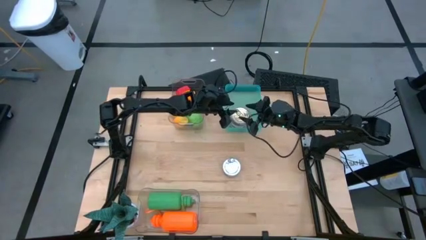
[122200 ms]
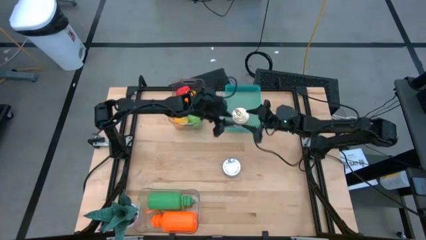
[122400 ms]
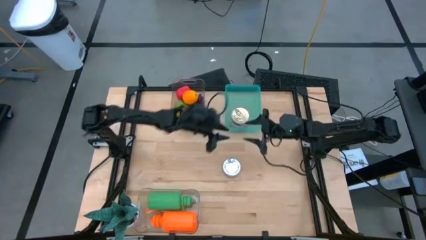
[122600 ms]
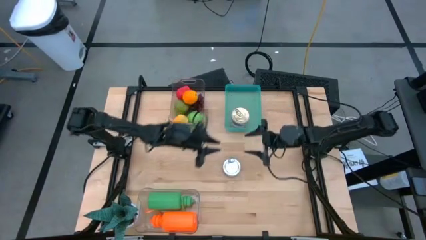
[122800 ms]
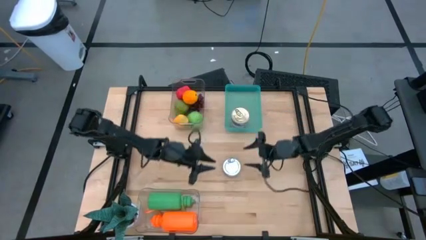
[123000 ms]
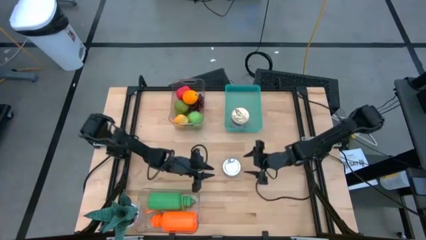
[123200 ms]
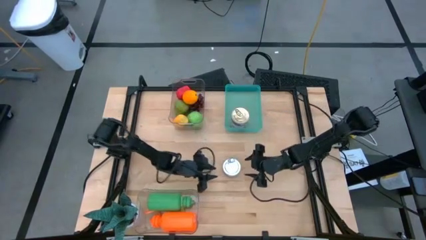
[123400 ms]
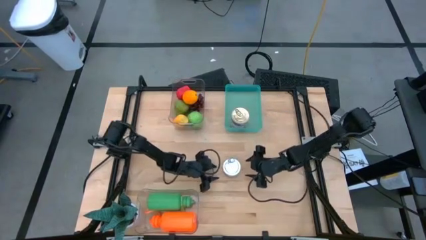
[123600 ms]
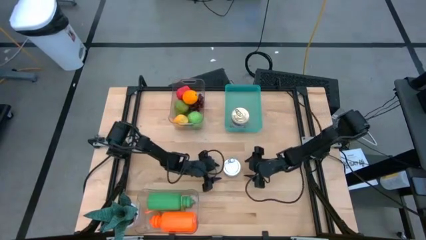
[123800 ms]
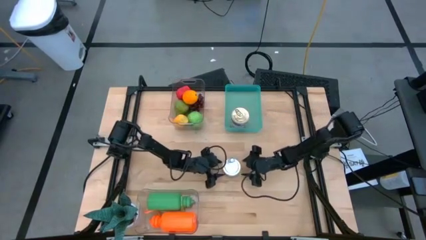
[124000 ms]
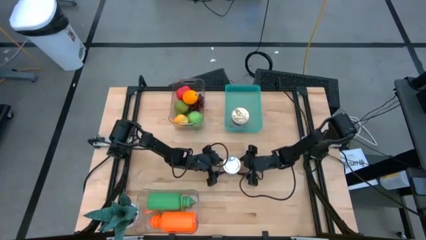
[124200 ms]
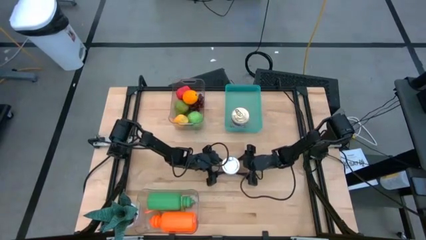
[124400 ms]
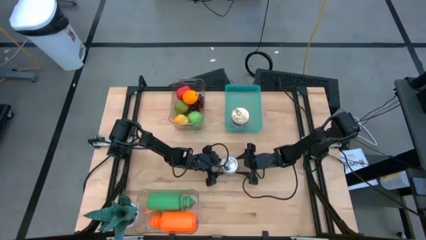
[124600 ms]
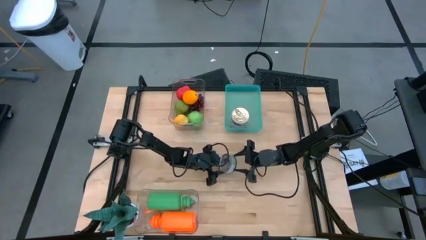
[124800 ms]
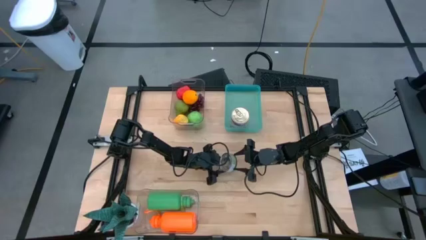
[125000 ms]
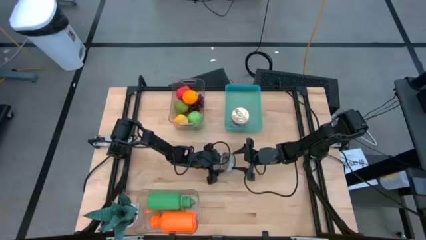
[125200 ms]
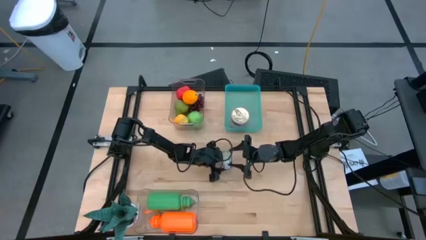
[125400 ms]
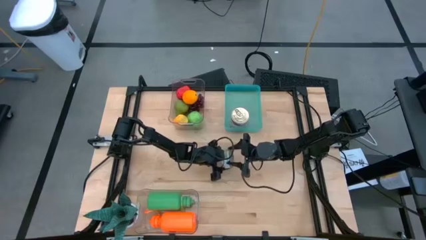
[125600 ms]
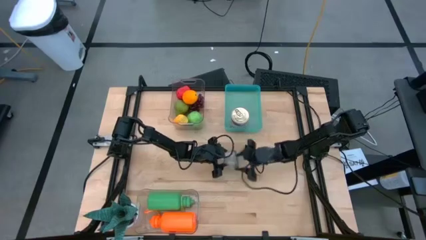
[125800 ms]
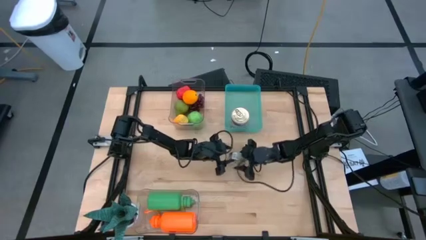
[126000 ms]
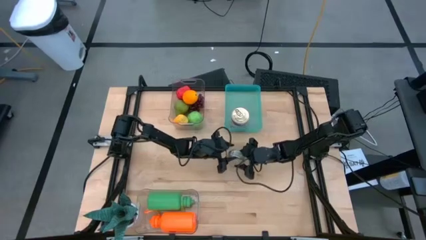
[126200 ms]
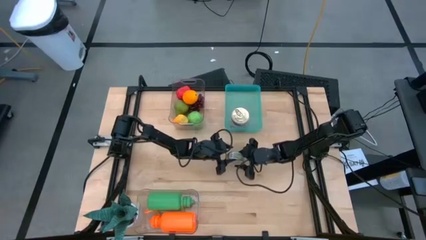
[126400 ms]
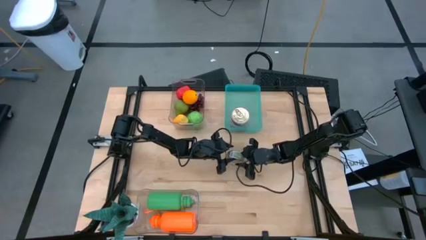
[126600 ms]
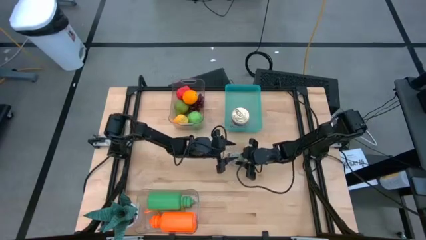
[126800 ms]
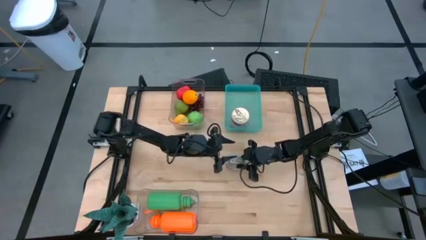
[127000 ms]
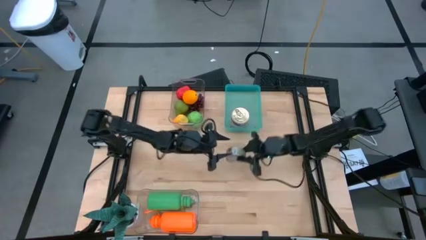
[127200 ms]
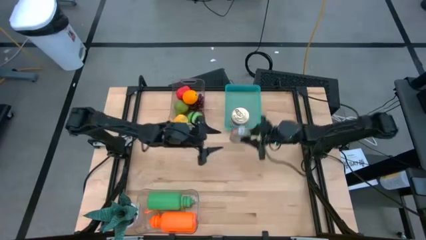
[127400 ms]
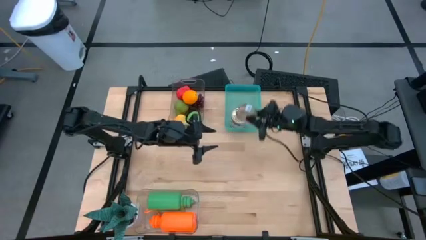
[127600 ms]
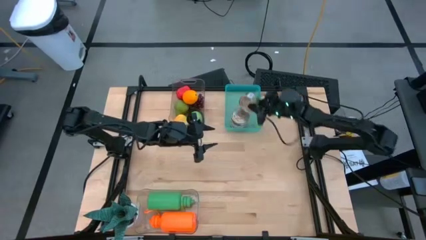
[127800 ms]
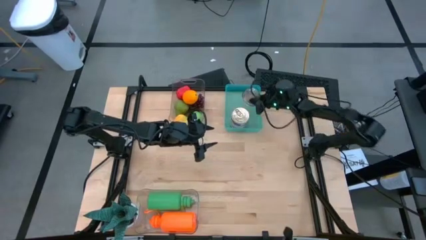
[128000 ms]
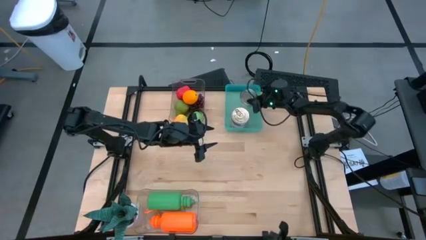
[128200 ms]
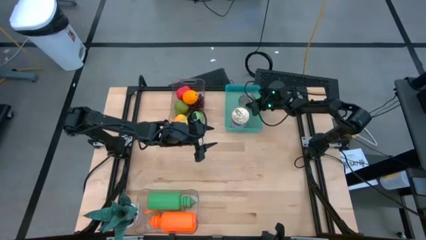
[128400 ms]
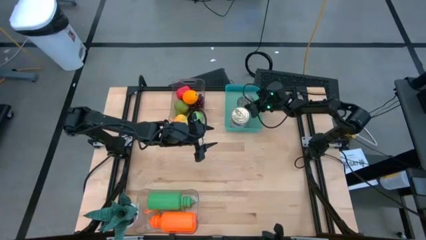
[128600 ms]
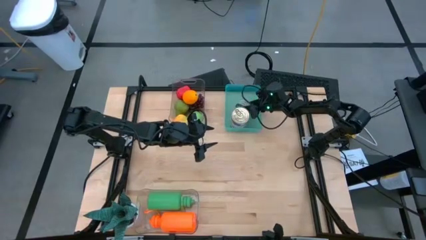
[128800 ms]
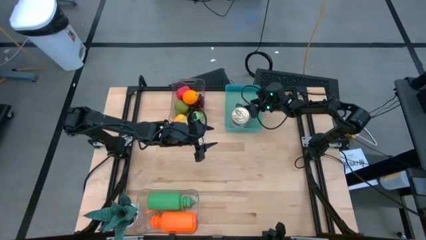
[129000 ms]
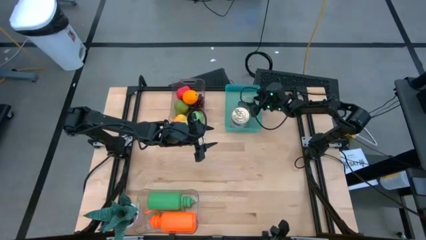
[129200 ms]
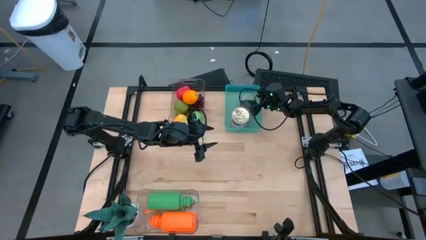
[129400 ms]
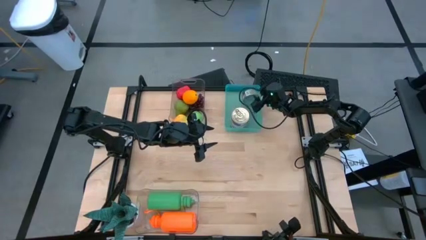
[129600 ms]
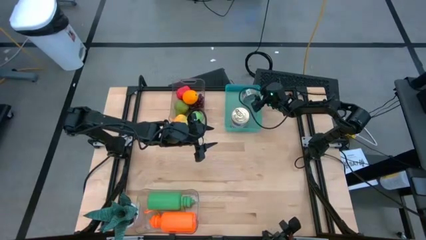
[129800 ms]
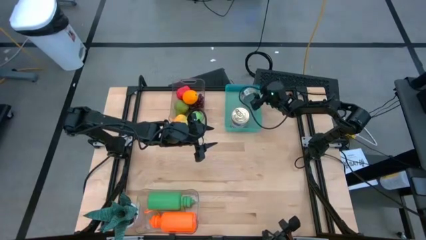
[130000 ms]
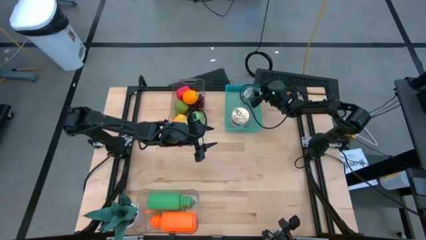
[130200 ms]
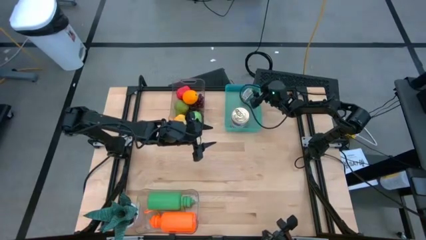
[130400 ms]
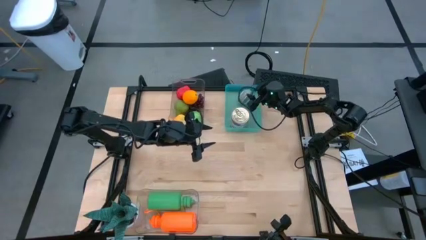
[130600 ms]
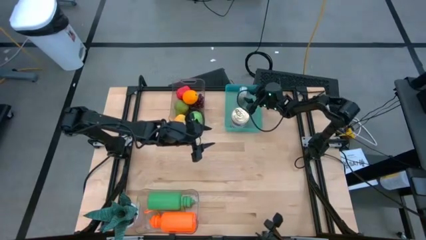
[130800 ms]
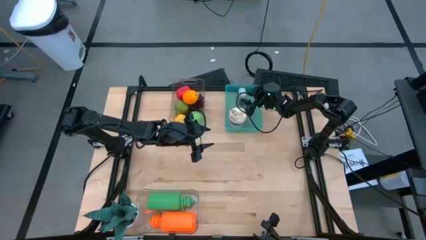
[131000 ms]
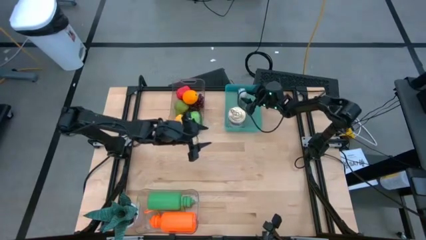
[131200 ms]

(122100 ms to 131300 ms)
Task: Pick & Place Food Item
Put the green tuna can into the light blue bin

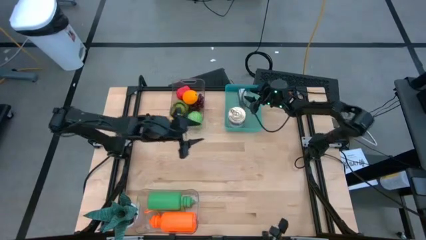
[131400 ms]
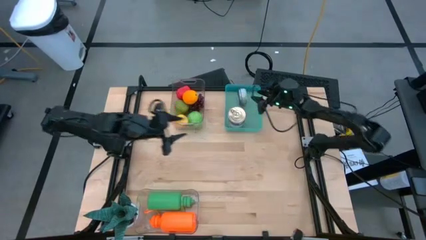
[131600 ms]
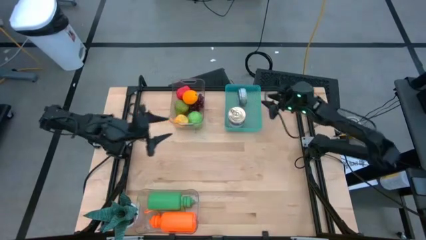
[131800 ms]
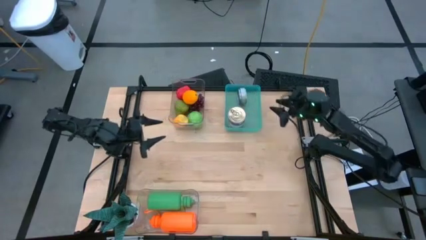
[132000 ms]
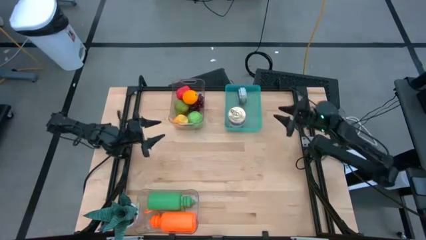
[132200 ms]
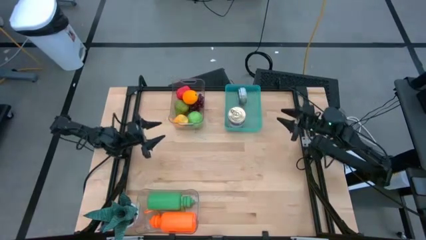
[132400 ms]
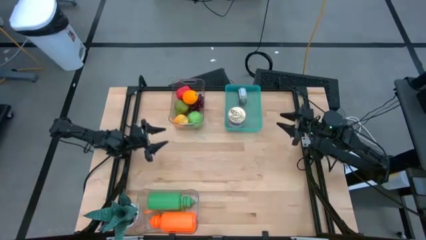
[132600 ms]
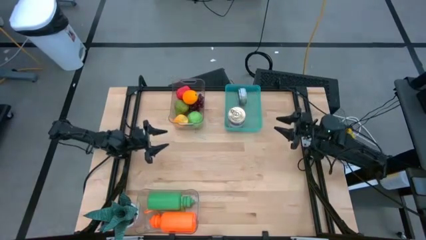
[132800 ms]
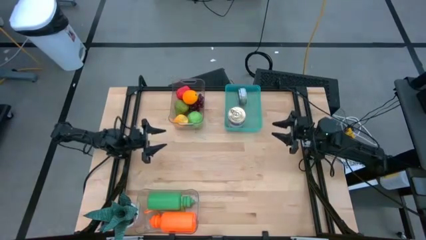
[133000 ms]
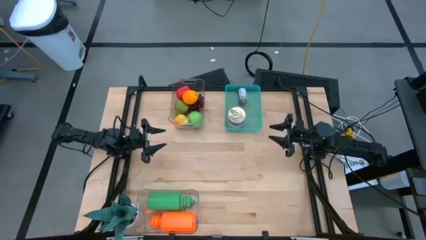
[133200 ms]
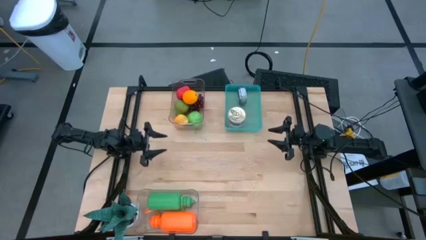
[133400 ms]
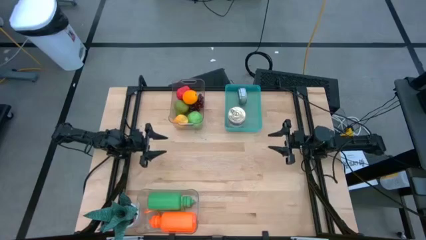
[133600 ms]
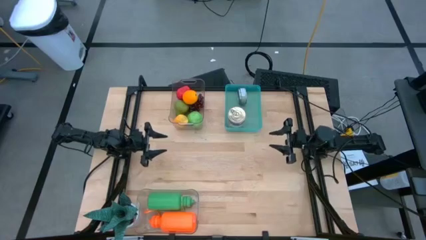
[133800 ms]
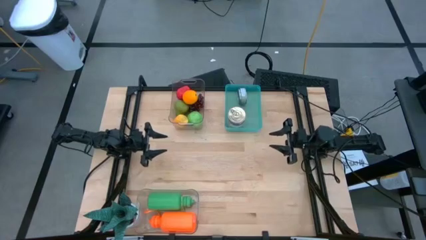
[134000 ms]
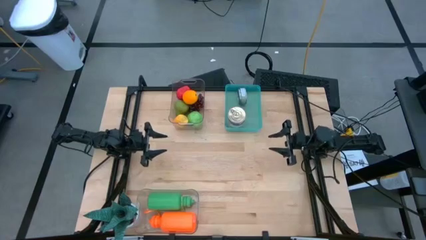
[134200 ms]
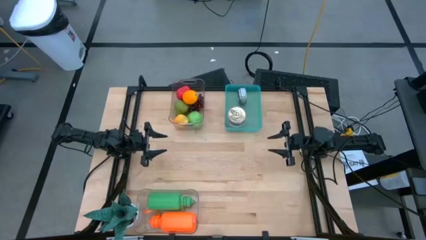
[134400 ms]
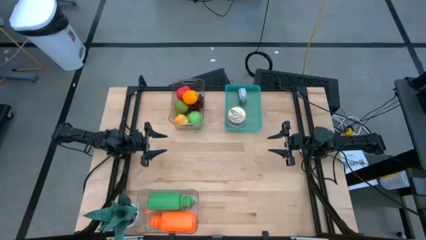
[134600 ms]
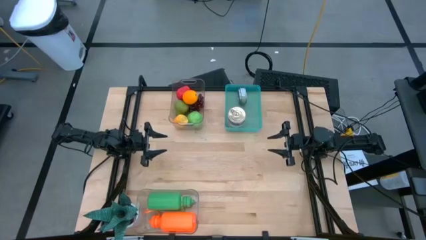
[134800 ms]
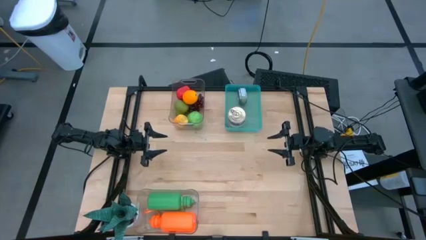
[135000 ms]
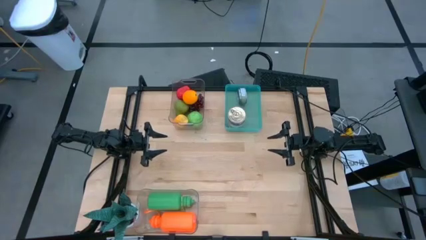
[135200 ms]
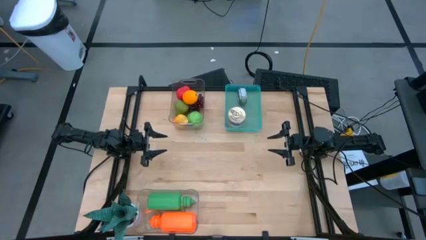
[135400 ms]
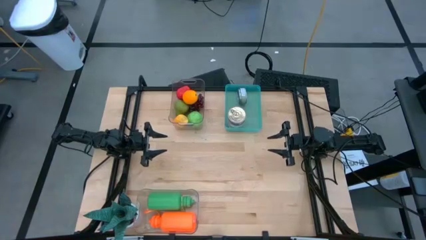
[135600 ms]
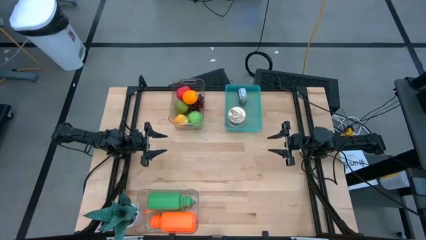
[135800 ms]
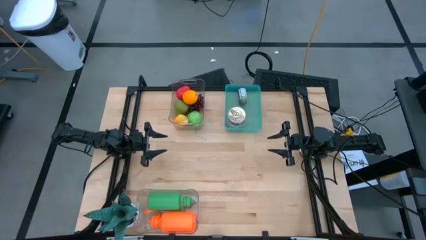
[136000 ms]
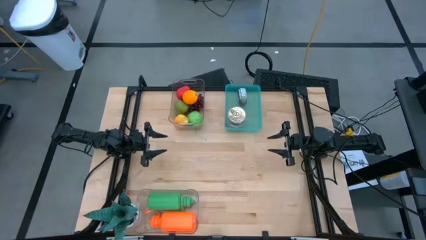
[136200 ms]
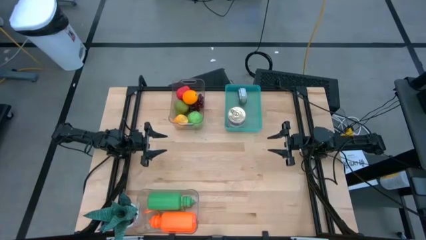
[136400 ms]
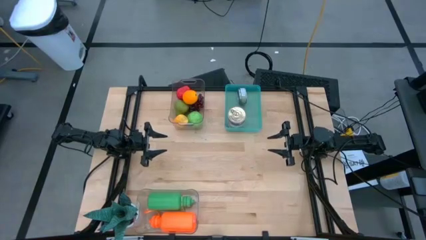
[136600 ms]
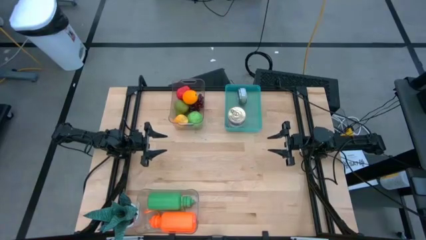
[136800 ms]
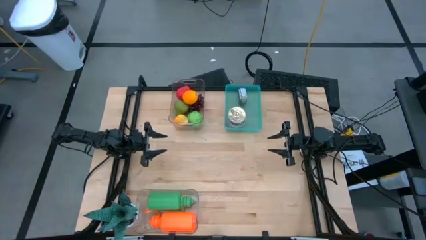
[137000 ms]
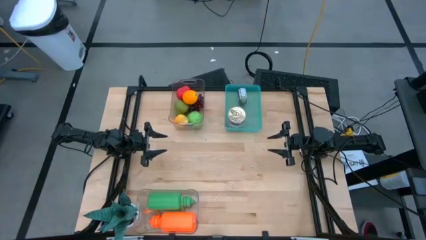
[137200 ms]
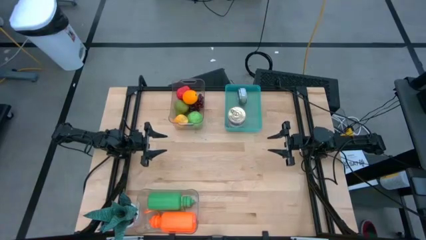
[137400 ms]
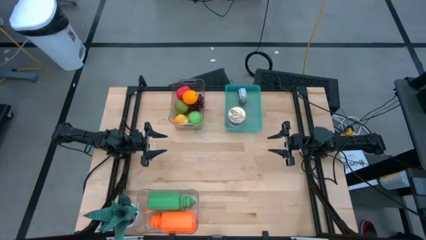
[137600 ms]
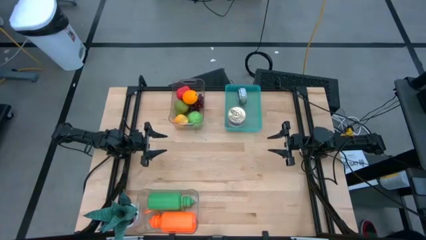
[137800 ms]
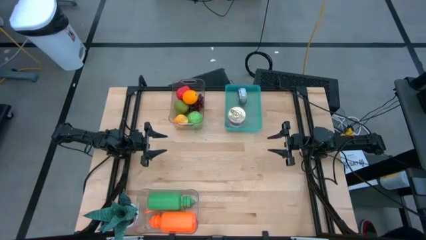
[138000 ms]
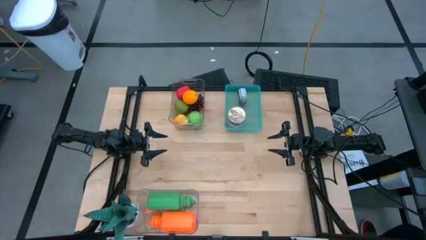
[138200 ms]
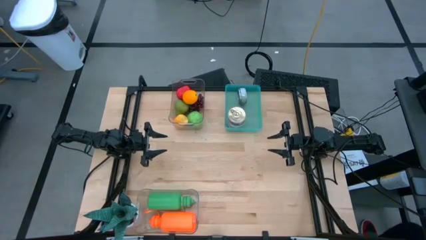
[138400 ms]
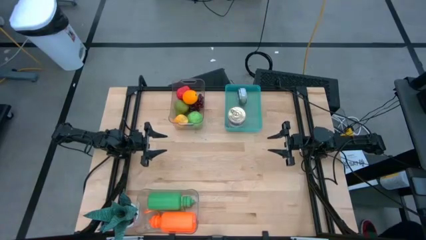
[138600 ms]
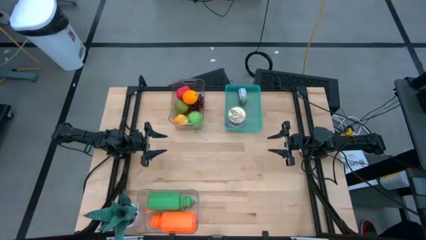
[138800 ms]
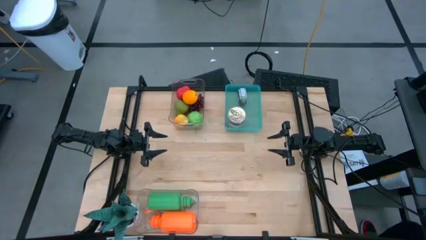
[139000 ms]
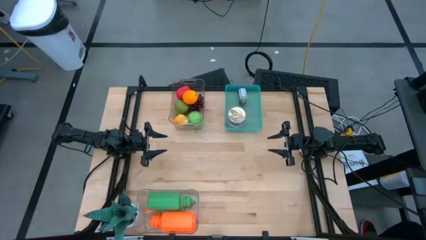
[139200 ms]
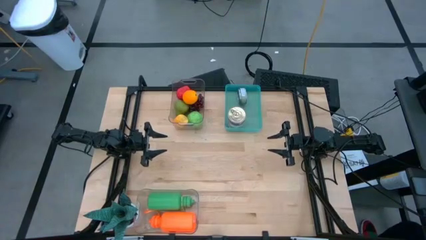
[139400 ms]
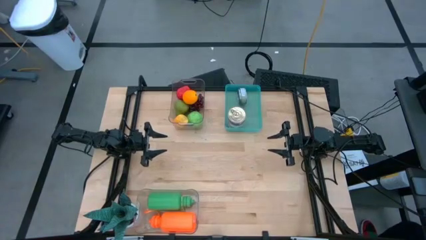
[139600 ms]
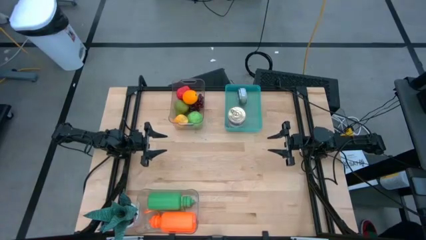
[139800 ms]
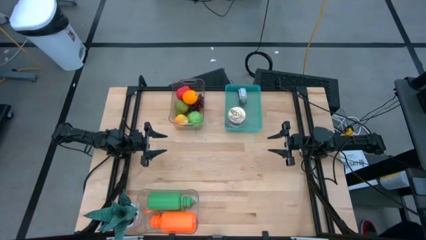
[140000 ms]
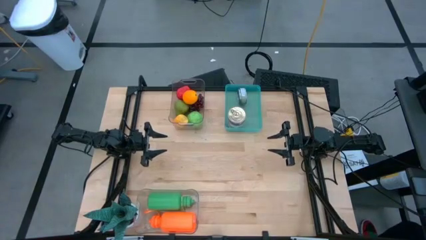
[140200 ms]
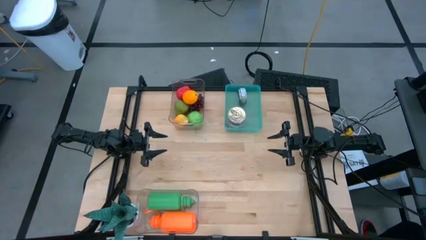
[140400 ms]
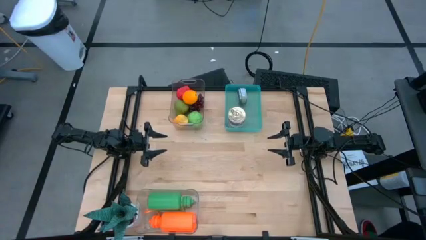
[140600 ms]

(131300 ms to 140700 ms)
Return to Home Position
